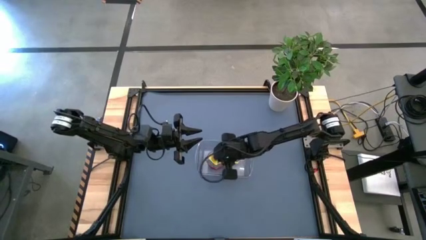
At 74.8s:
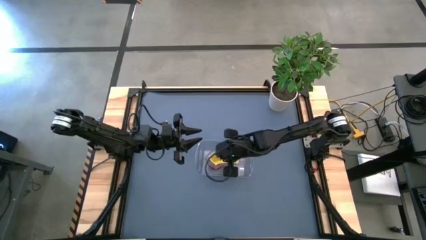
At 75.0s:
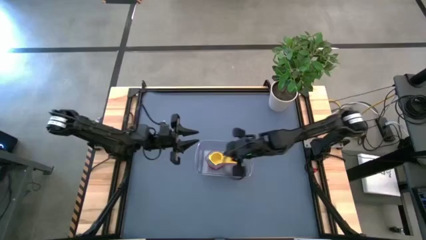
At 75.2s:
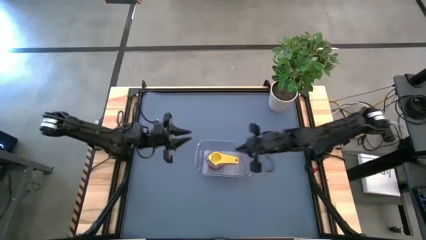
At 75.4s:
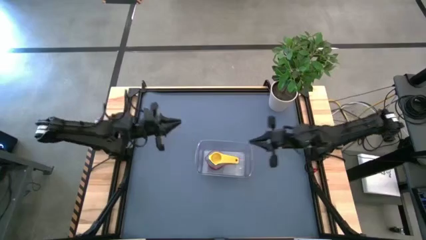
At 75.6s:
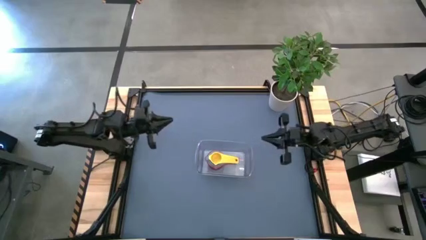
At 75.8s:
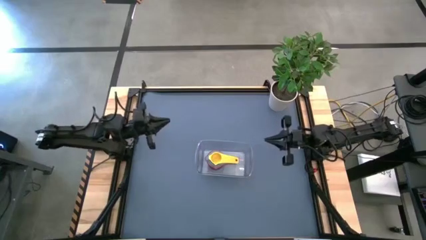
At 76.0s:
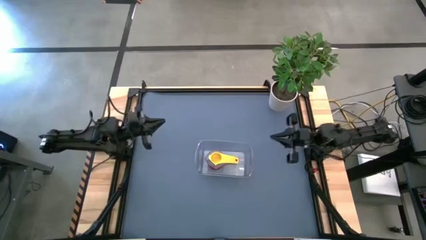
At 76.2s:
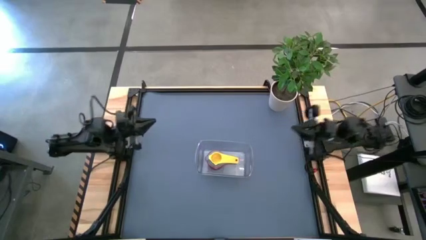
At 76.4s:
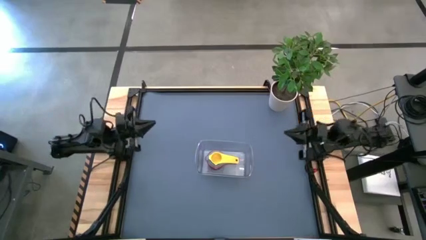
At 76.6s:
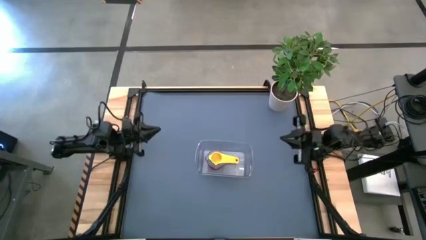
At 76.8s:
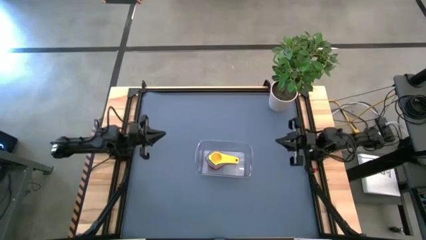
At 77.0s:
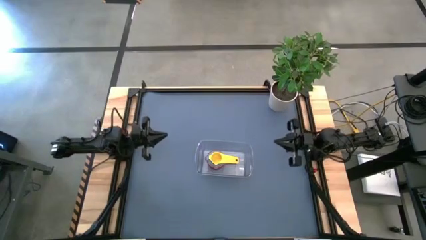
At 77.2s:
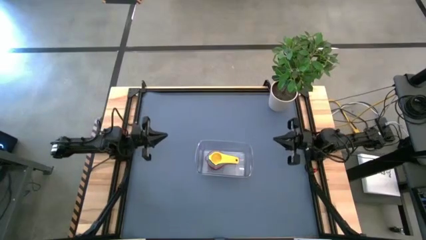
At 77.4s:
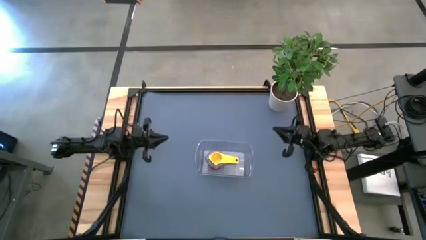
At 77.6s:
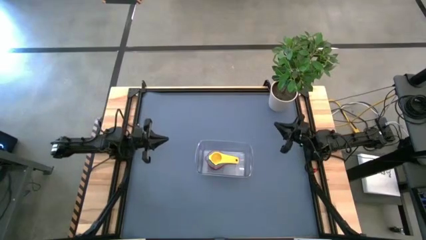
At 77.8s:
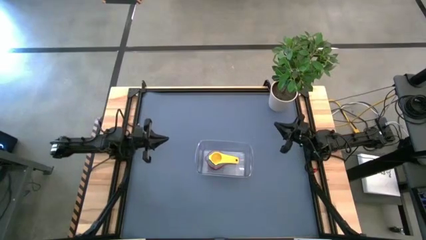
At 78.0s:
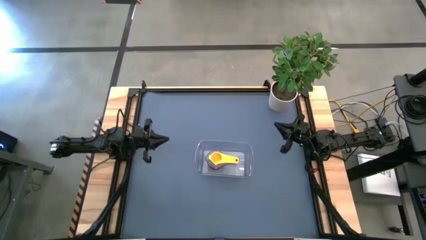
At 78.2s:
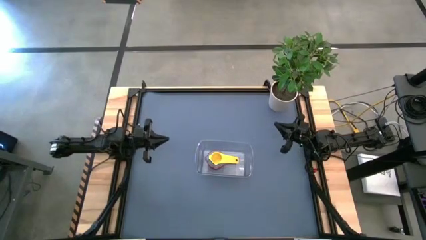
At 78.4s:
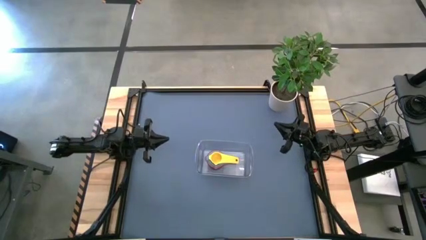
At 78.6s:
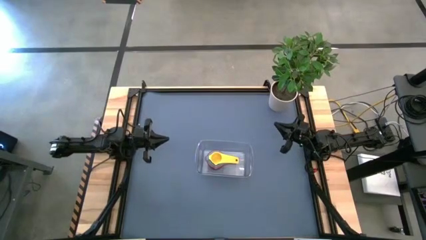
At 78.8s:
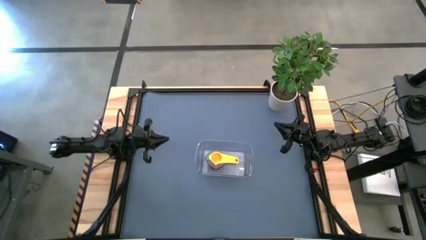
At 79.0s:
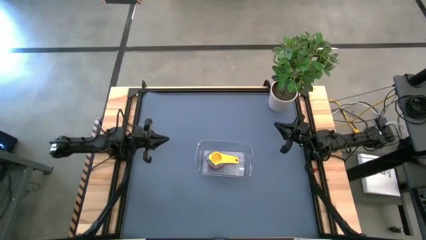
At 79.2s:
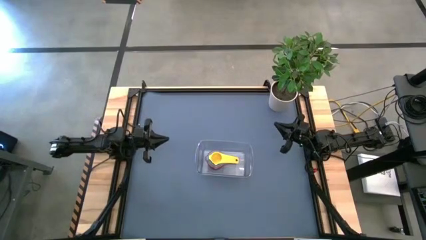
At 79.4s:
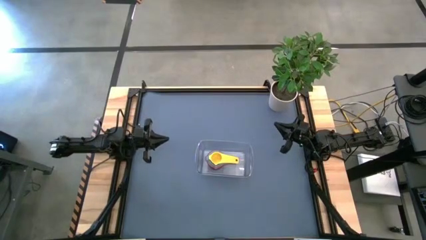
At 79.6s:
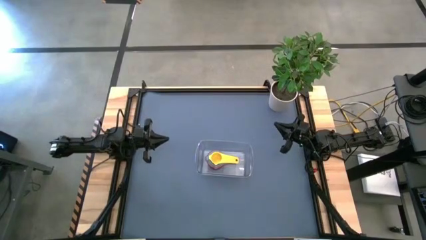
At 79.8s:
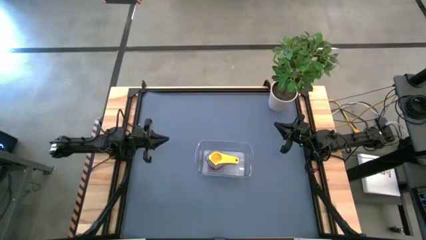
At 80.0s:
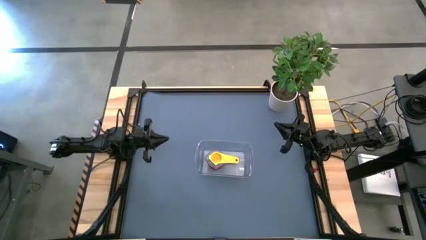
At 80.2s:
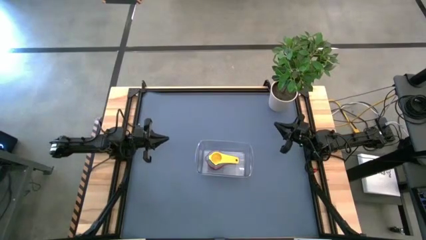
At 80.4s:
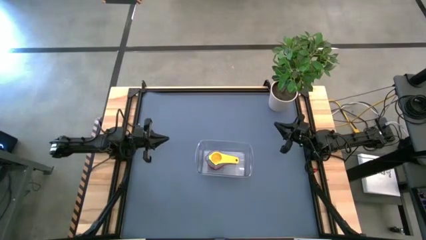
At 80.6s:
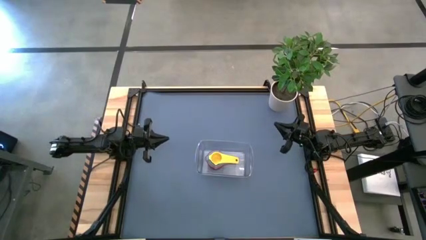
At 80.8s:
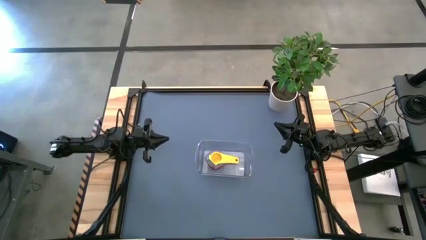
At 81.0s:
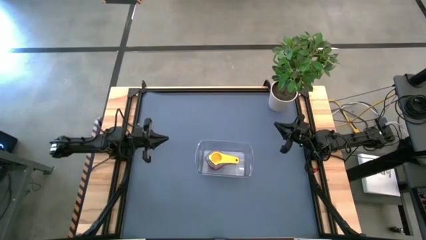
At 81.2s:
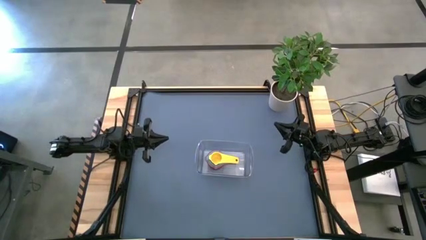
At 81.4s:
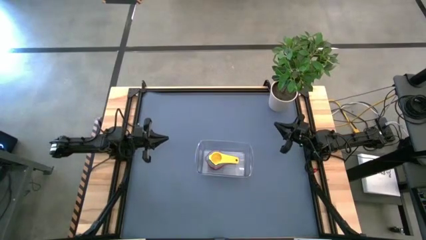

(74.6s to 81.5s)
Task: Nest measuring cups in basket
Return to Home Position

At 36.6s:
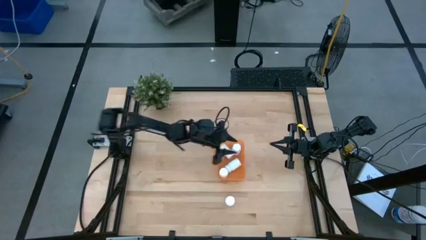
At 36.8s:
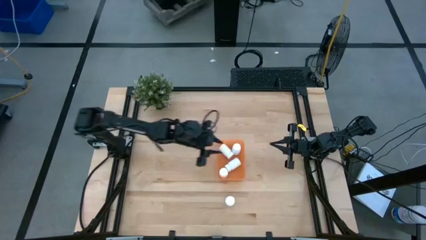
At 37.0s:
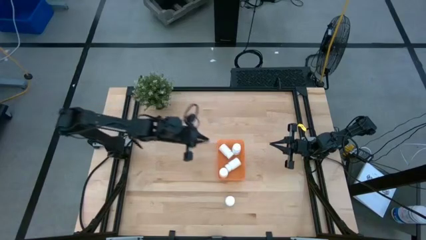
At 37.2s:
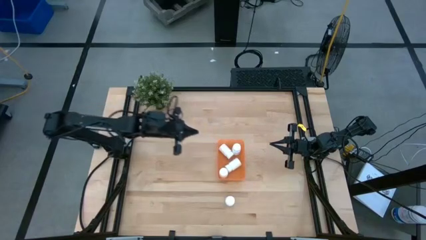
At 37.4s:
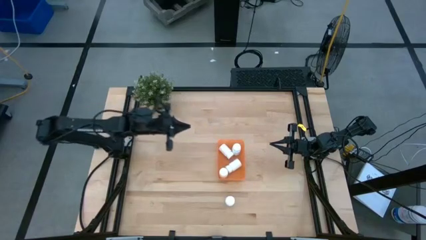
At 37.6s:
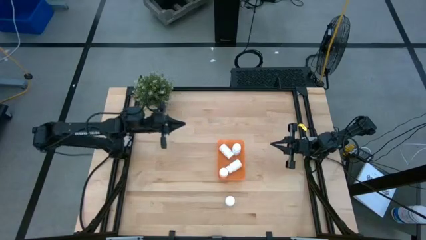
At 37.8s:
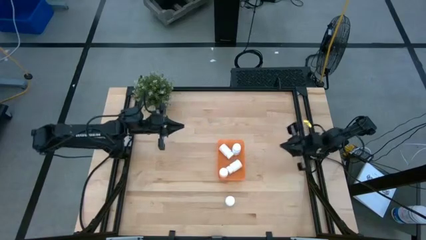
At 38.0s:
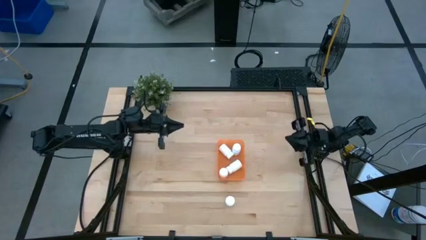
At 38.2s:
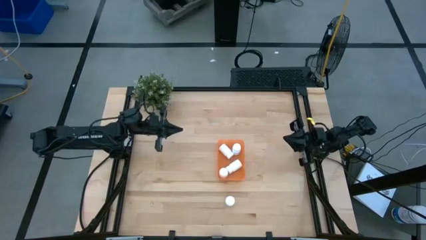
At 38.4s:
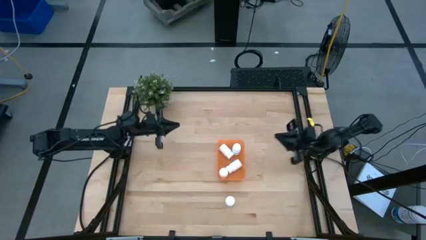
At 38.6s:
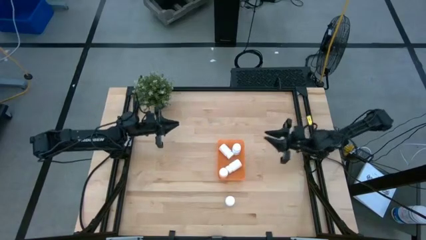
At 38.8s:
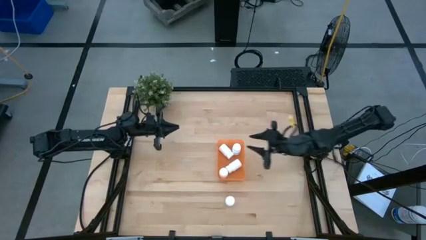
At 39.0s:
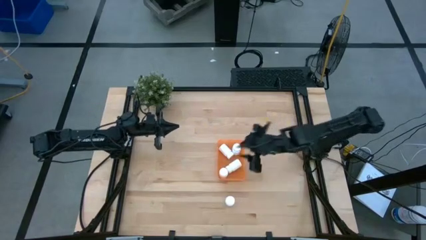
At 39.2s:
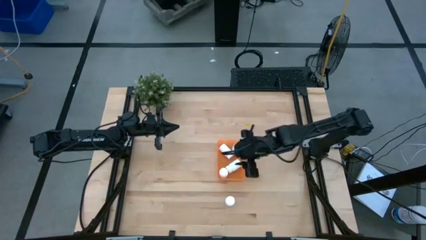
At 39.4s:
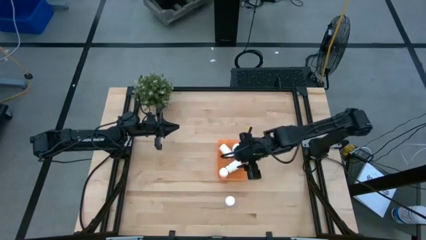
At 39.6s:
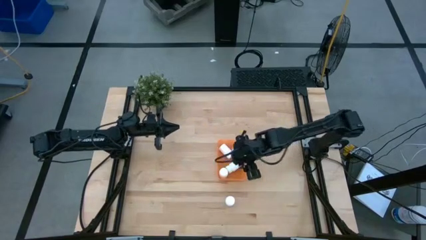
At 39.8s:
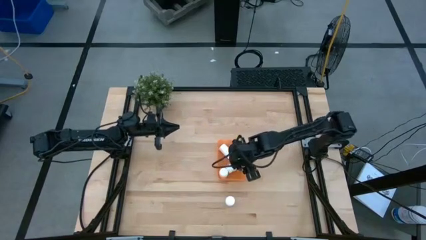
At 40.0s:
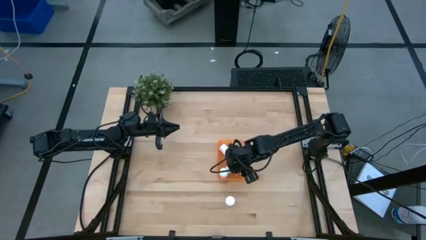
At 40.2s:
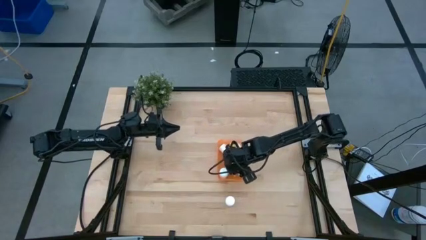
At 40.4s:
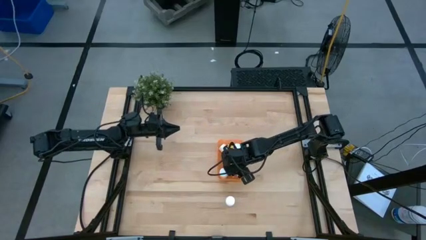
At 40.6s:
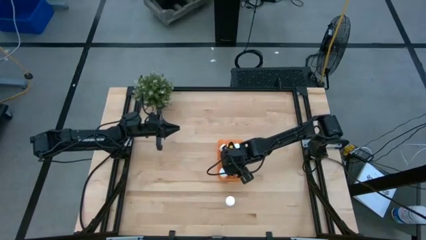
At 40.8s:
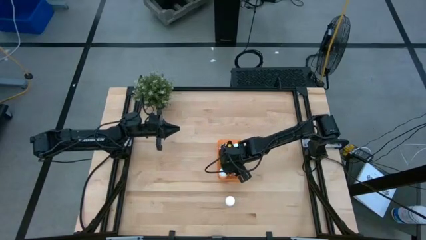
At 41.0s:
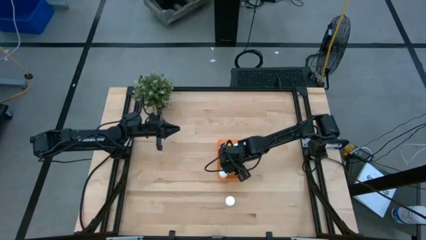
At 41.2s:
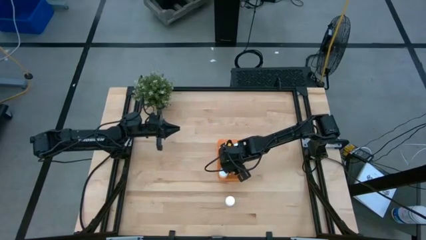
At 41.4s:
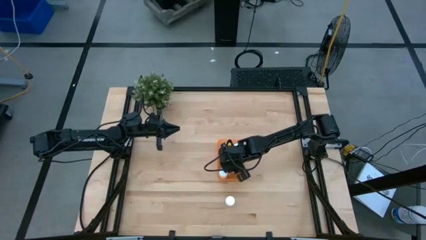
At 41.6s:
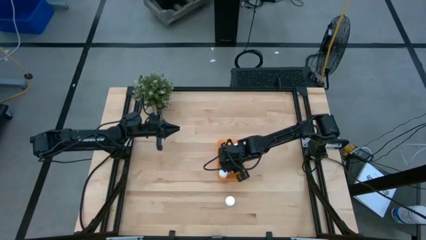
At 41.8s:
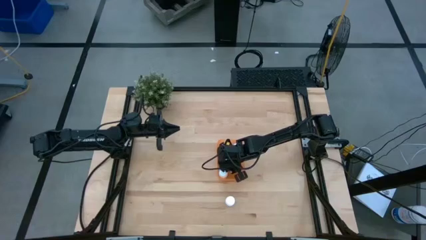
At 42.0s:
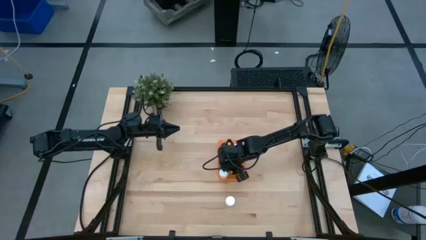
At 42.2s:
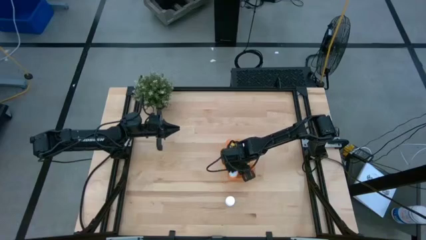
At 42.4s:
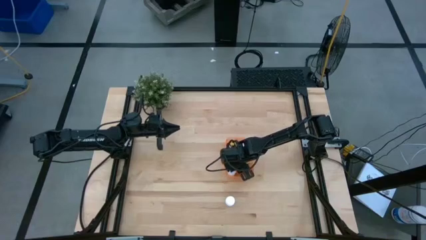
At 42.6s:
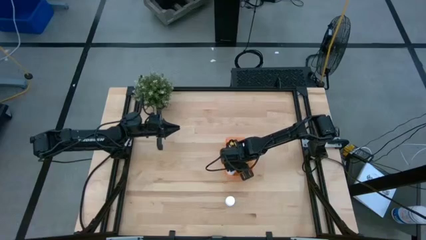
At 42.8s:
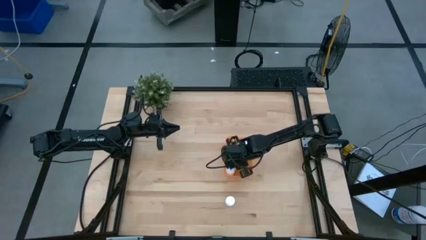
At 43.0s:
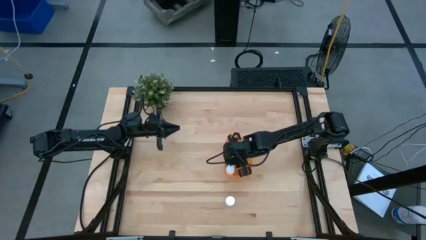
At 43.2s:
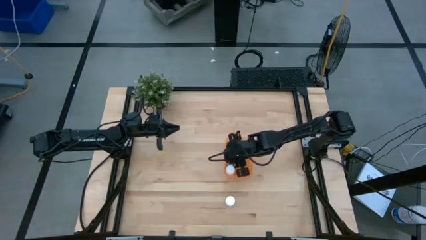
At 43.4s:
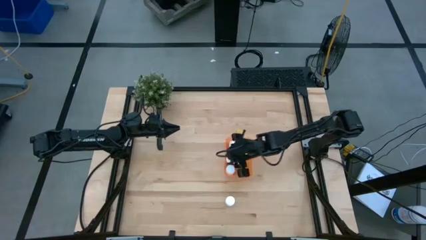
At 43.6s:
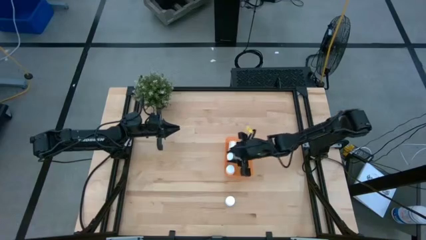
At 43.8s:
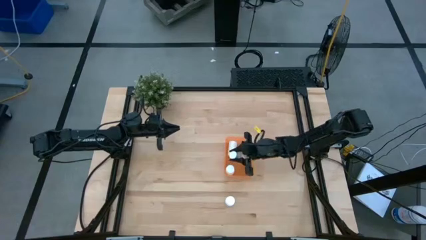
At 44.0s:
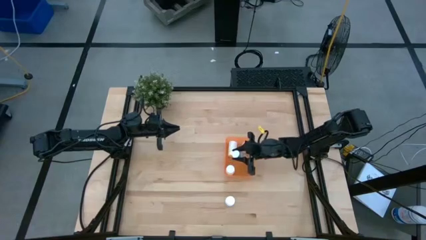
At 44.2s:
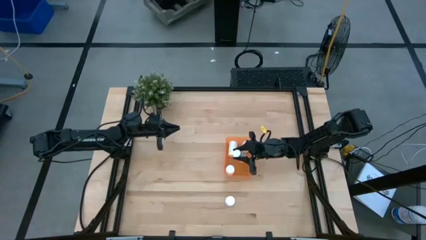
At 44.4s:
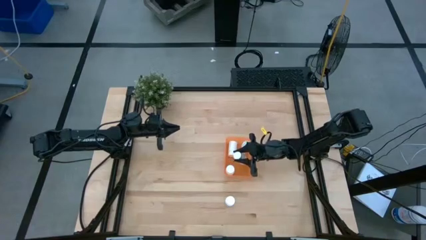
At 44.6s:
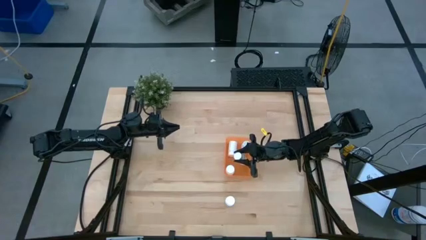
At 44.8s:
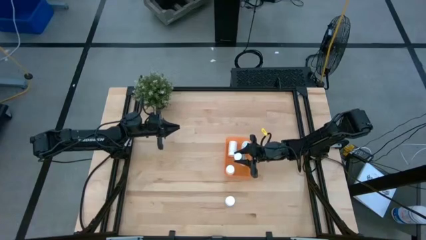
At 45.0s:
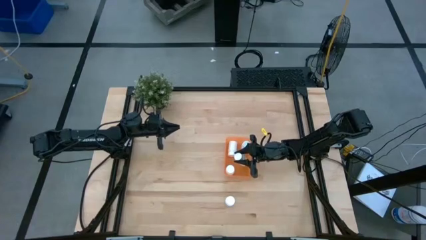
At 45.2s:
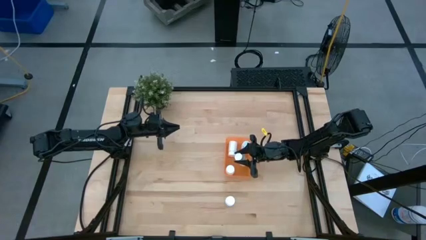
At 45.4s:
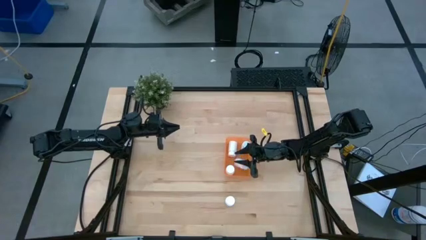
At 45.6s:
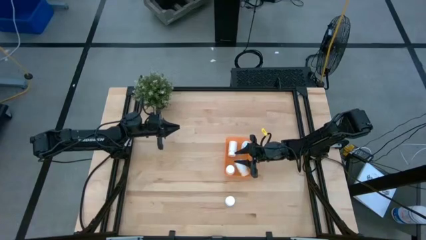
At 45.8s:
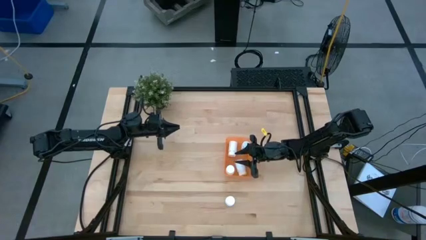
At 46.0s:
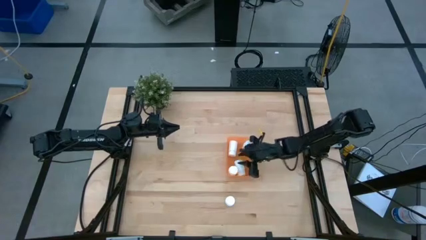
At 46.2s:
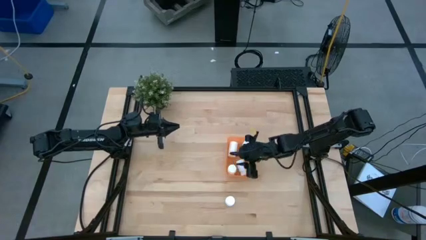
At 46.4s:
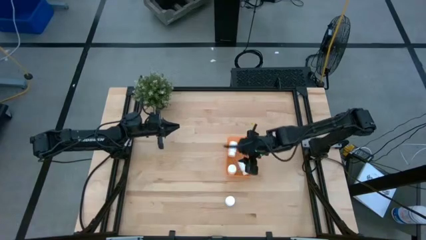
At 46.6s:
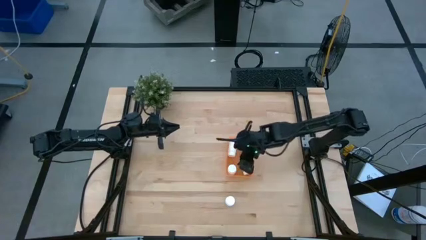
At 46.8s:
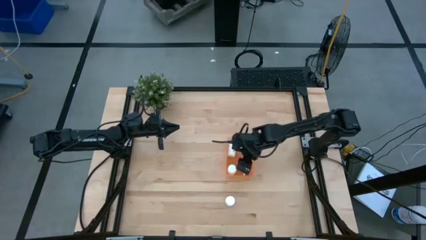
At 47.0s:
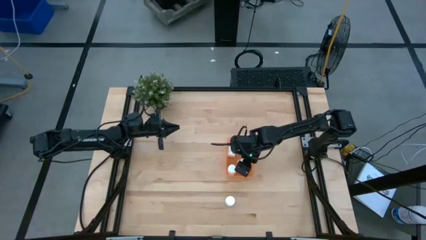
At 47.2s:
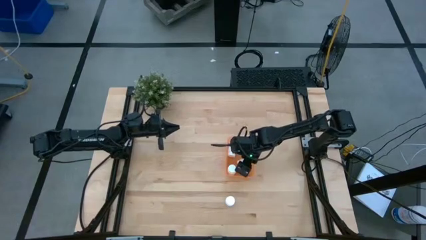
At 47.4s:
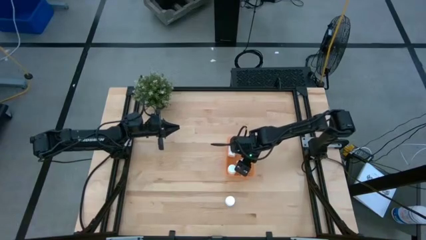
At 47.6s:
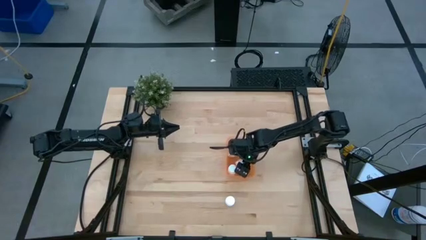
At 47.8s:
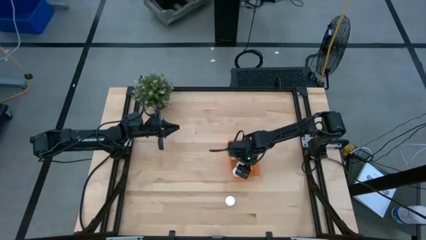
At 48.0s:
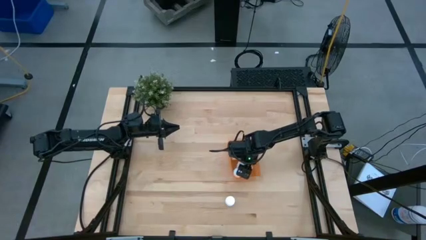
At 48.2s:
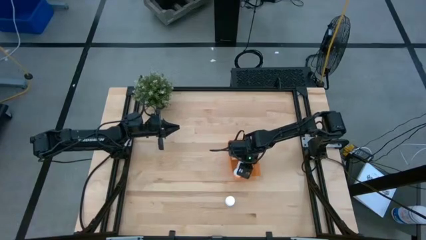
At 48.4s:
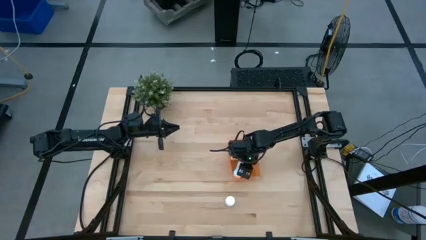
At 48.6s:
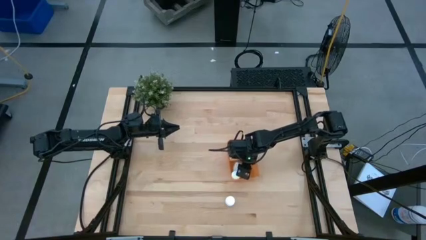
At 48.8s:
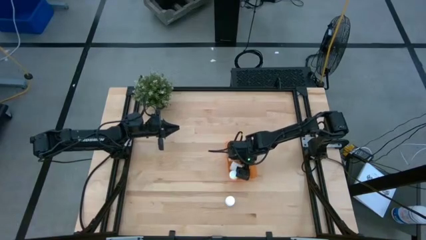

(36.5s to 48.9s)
Task: Pick and place pill bottles into a basket
Adjust the white medicine bottle in the orange bin
